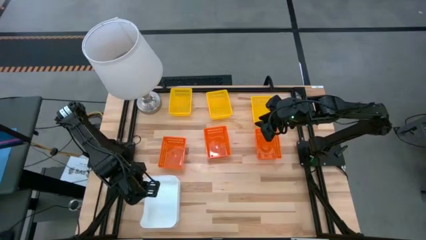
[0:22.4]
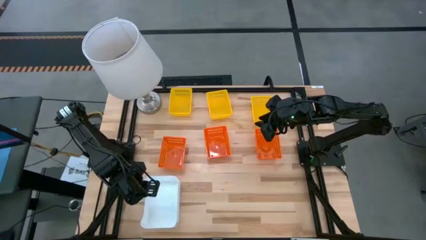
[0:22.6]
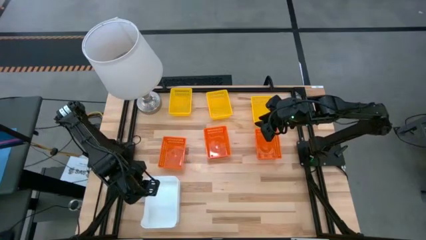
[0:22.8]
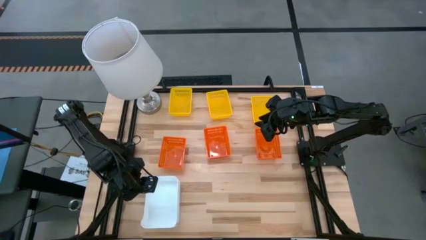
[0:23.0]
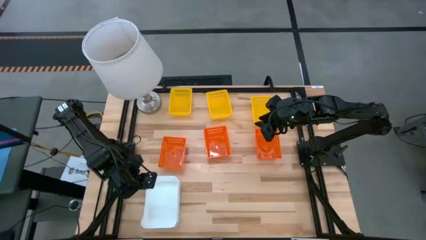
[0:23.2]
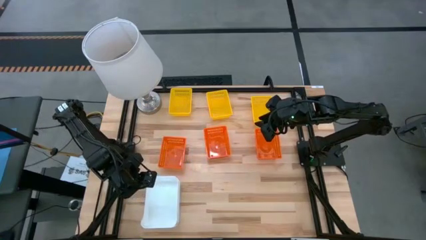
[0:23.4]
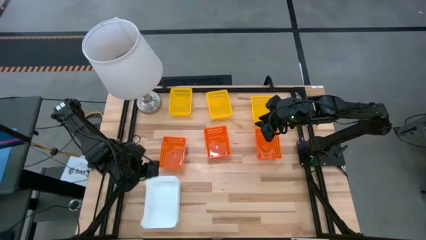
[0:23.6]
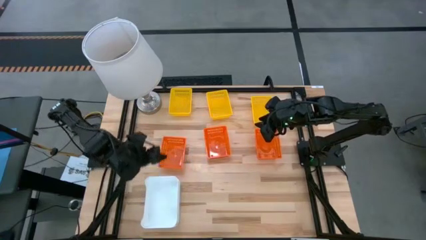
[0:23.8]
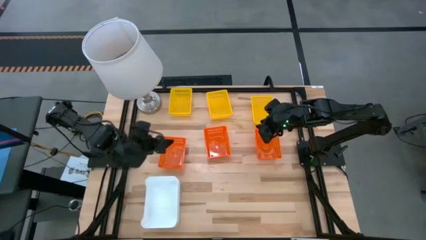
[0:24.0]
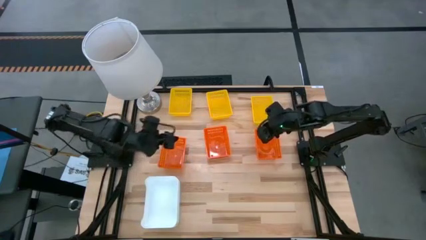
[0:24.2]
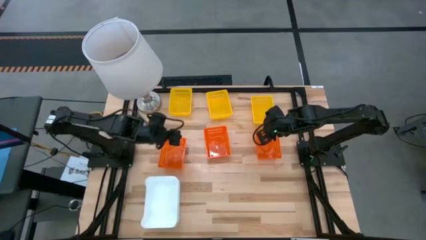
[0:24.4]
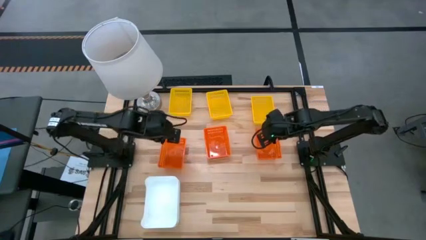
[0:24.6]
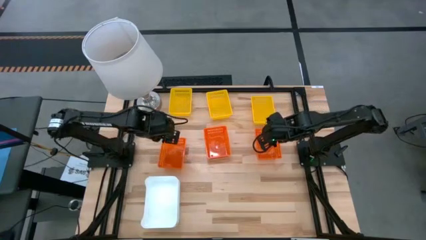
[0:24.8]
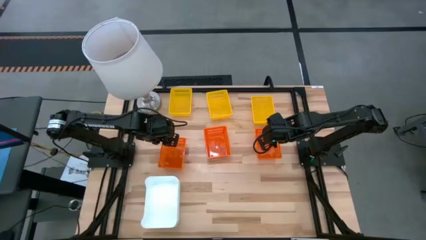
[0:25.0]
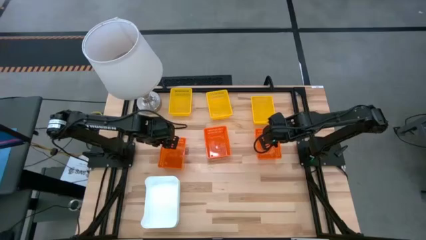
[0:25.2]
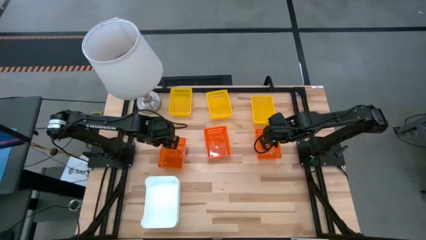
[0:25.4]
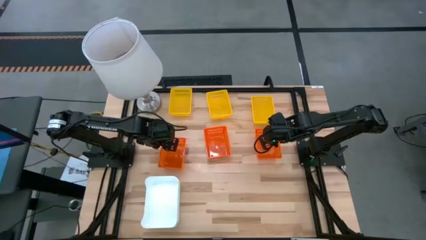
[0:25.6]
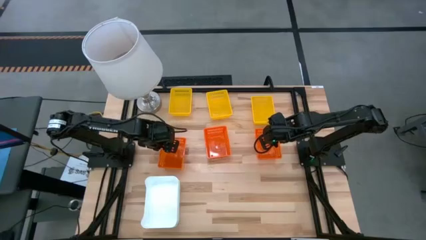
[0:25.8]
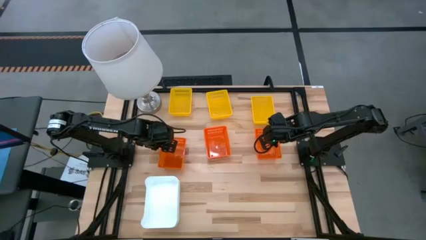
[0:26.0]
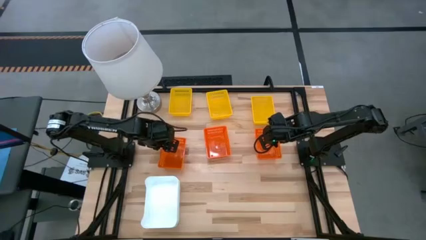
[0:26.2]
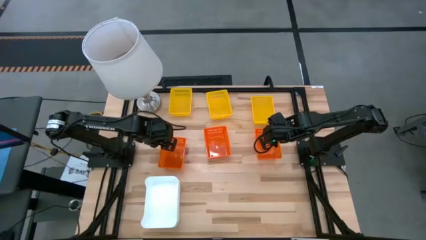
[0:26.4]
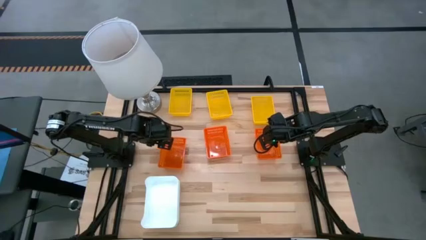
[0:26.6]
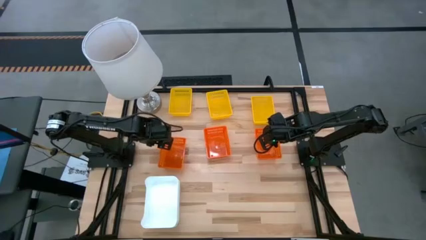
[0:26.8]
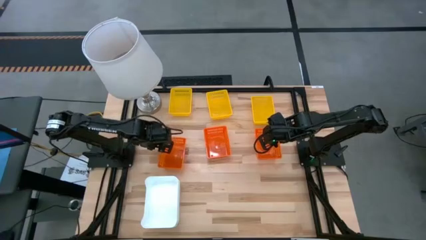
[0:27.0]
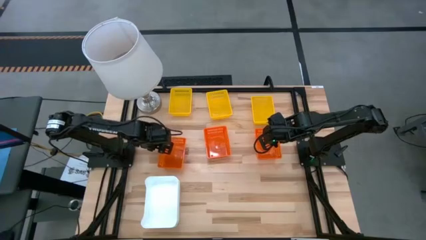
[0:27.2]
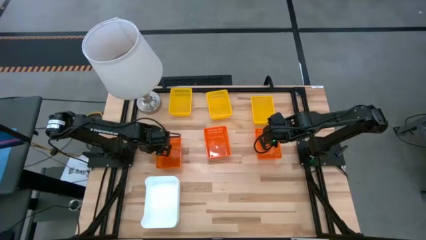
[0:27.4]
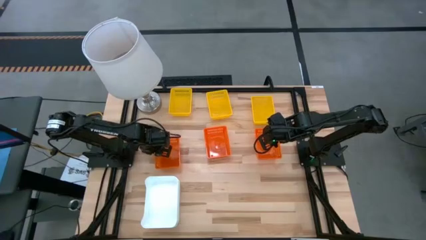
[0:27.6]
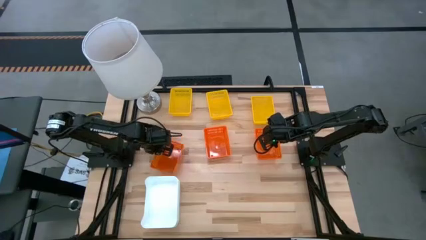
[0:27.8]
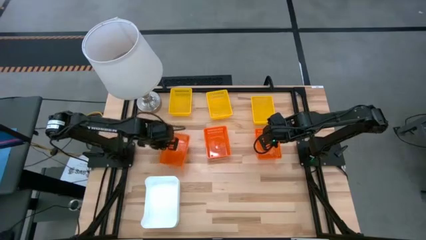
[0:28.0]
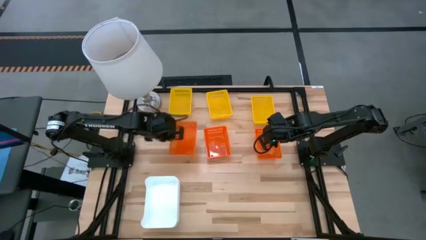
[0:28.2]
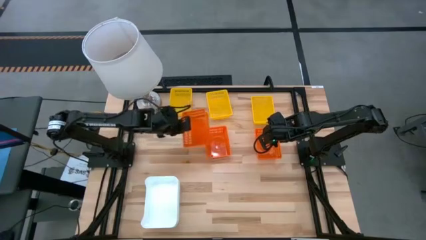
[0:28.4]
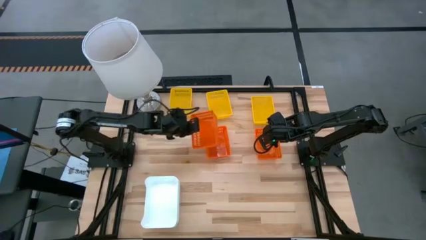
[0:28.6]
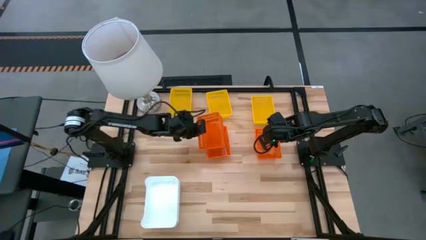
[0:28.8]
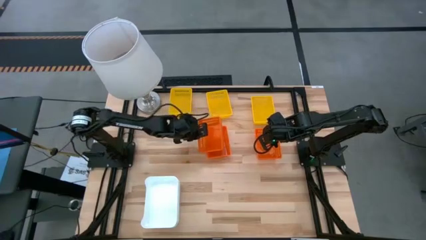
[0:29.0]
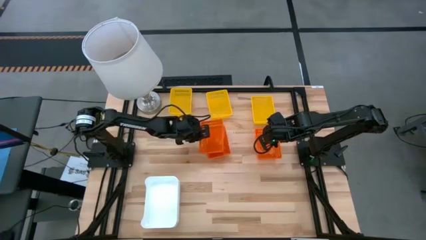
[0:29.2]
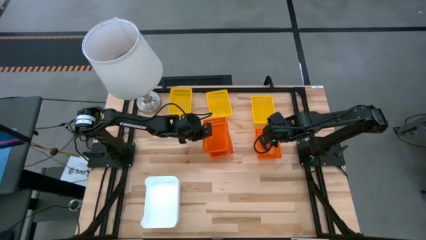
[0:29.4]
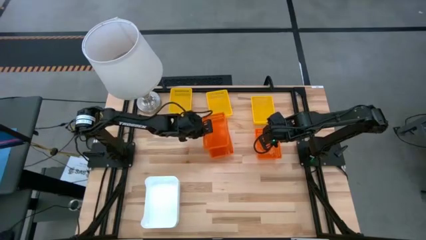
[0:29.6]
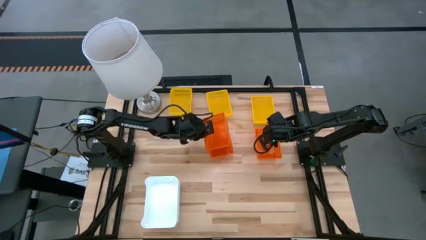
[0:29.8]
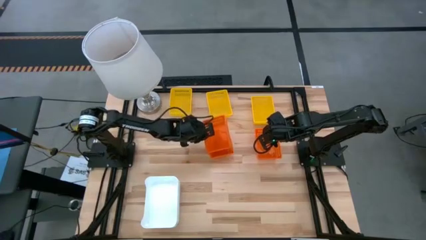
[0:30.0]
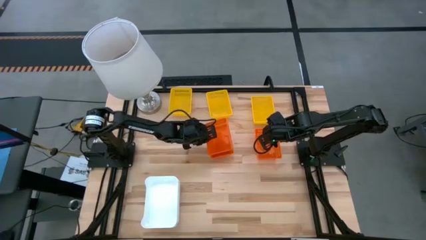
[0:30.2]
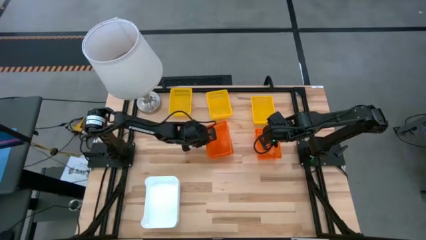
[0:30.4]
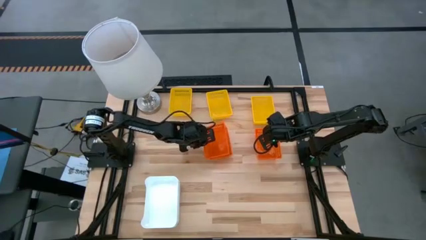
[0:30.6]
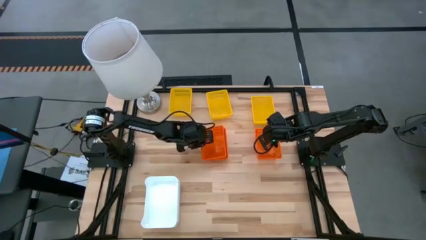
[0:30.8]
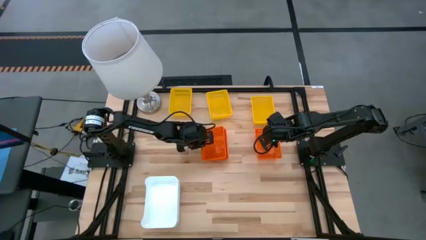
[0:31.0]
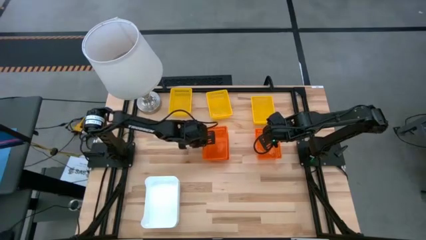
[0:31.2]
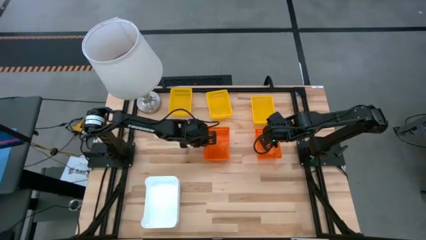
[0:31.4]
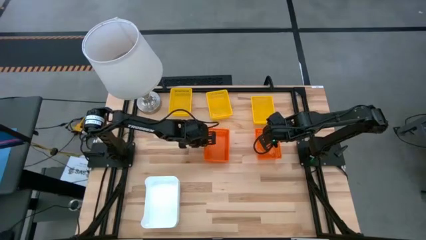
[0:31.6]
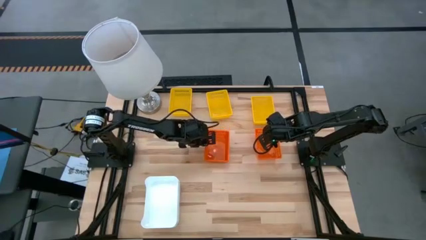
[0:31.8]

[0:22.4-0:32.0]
Stack the left orange bin on the middle orange bin

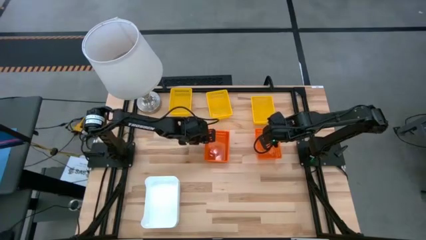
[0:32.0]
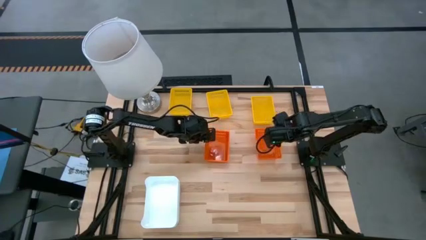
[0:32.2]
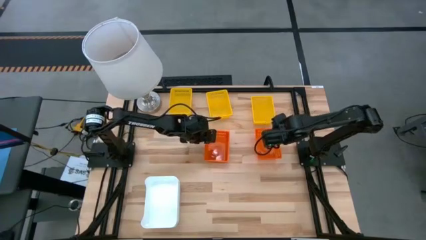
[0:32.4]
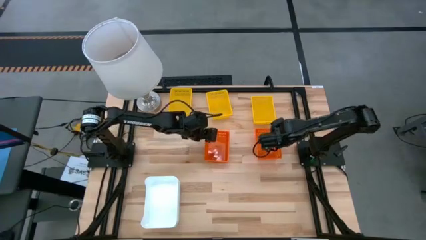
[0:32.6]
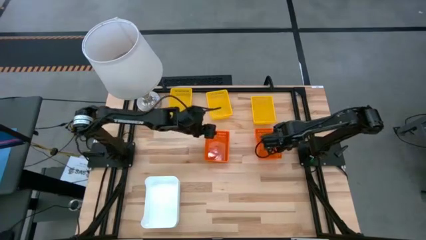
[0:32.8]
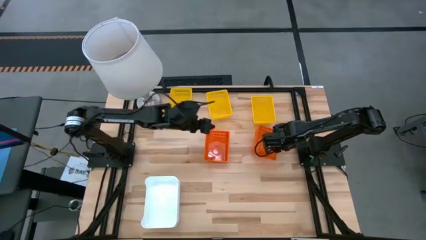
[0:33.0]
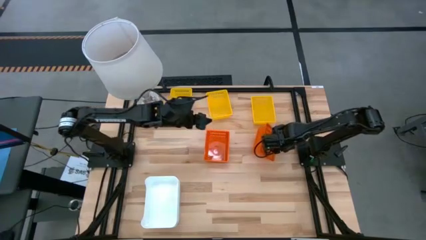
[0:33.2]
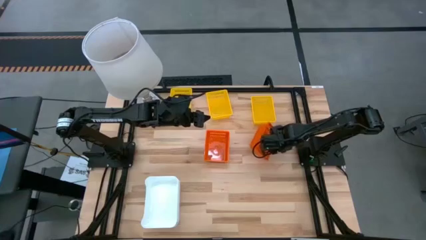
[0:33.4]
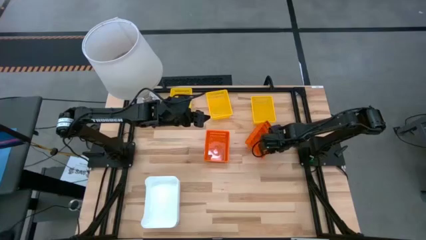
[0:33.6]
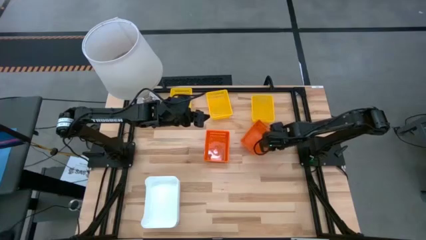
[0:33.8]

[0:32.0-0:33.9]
Stack the orange bin on the stacked orange bin

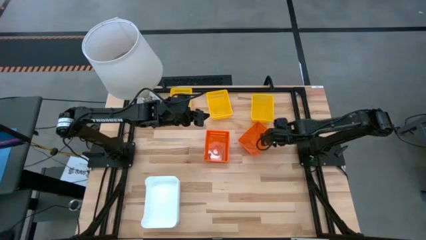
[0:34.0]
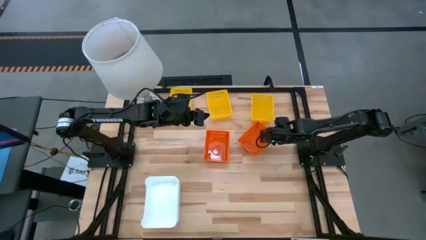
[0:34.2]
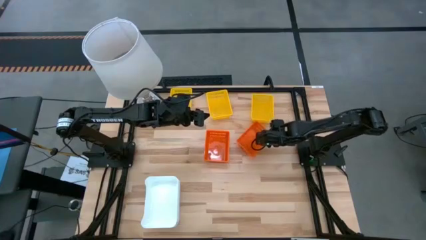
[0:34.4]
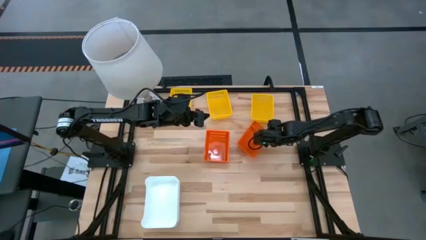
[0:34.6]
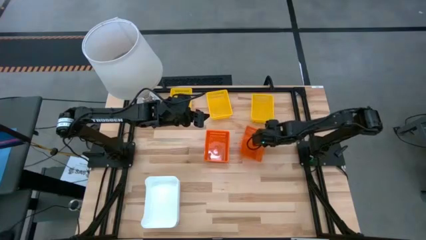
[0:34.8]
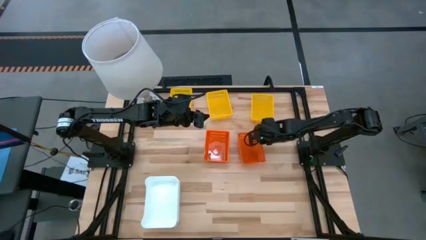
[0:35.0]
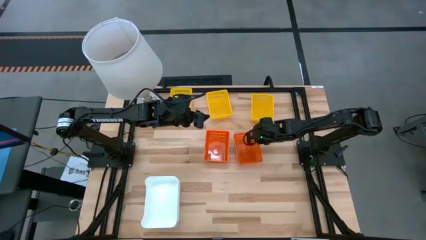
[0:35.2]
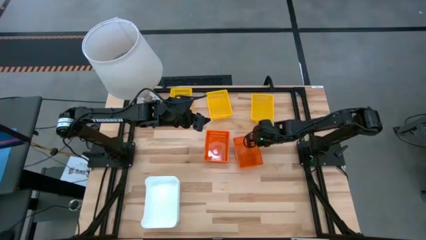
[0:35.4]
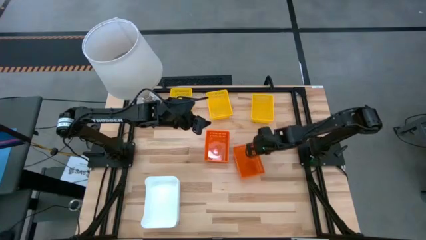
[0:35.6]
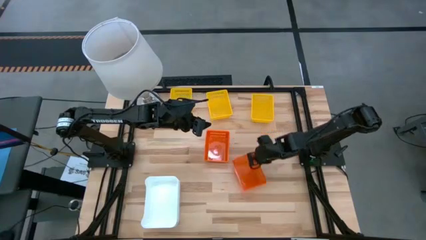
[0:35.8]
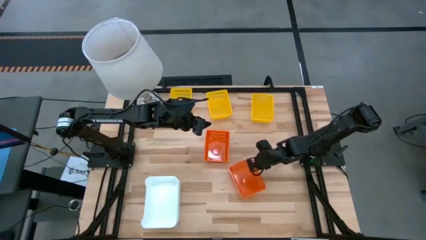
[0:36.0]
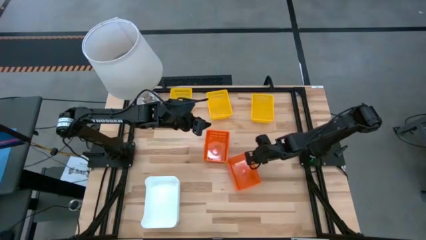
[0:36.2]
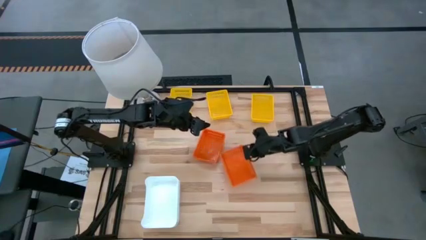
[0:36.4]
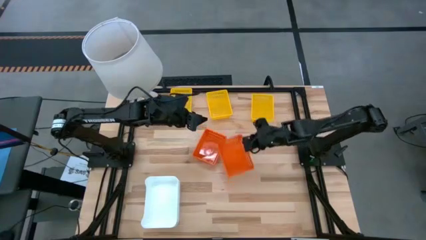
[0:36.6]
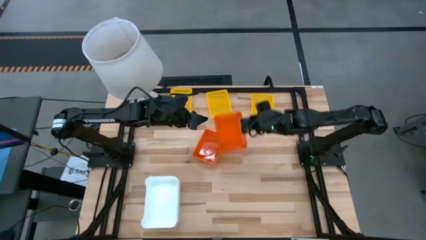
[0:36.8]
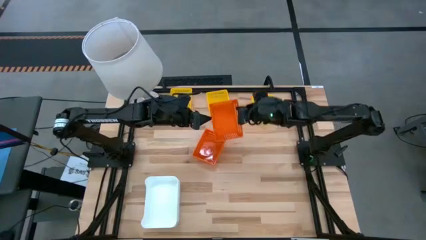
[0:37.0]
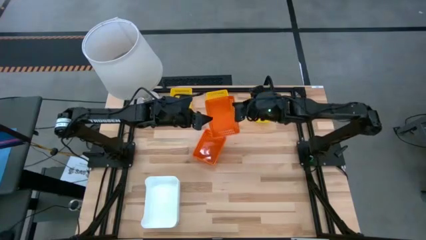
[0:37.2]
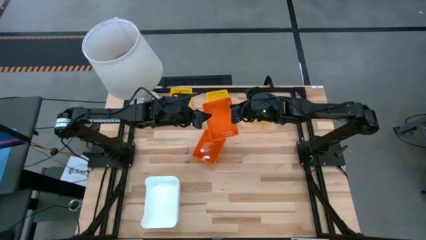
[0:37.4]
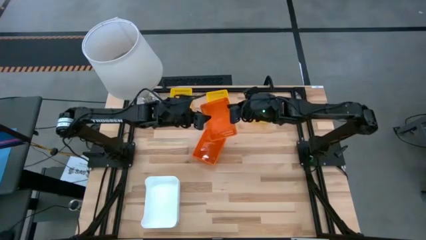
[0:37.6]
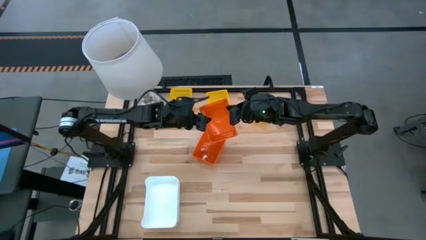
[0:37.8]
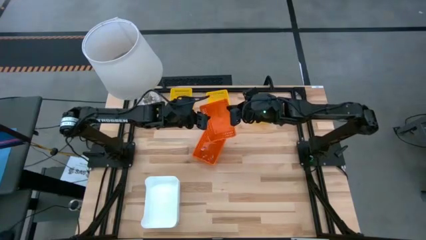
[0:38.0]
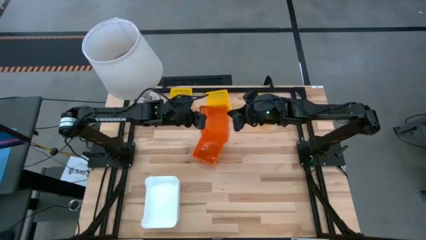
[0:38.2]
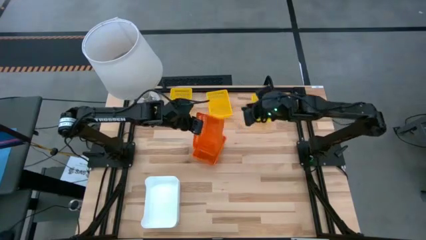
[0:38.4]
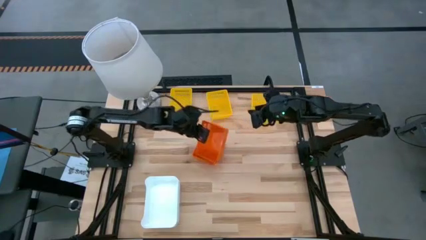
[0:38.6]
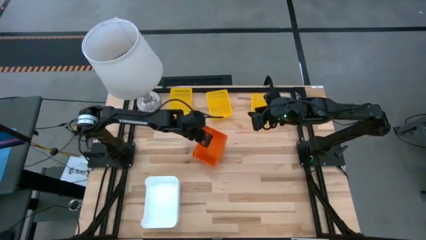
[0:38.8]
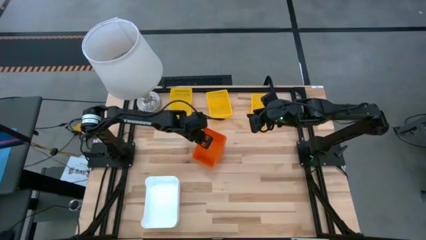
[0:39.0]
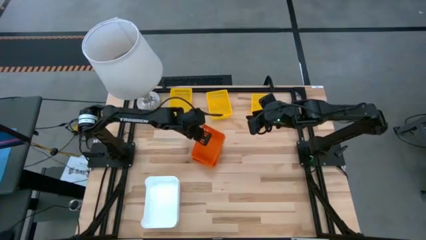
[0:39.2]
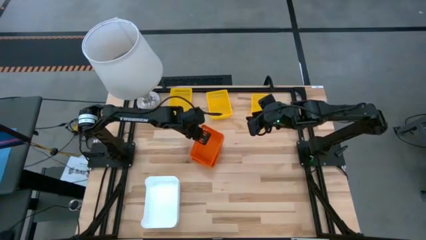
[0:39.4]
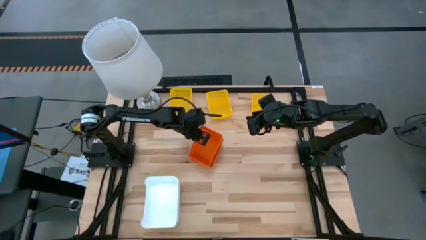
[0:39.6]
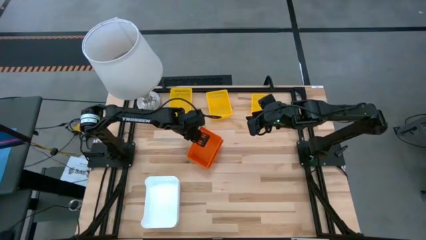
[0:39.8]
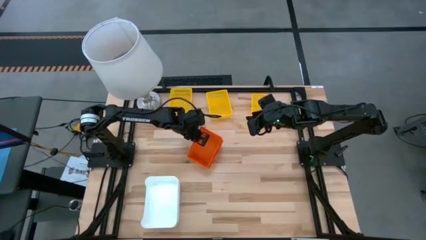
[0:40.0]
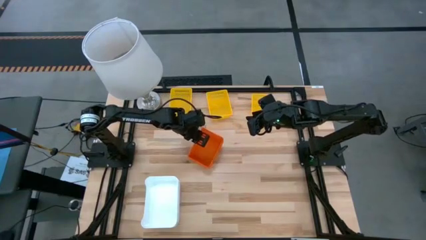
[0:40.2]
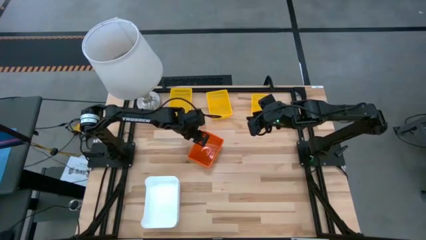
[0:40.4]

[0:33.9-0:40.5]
Stack the orange bin on the stacked orange bin
